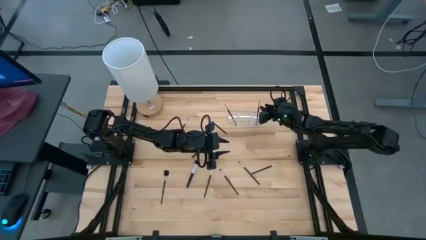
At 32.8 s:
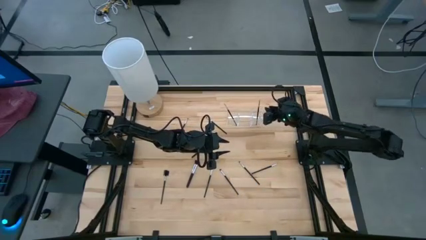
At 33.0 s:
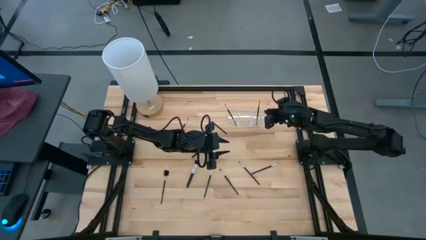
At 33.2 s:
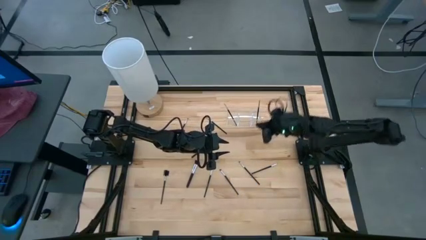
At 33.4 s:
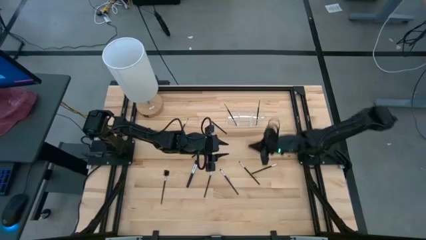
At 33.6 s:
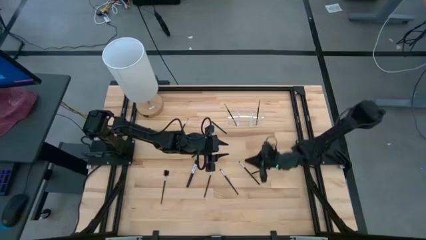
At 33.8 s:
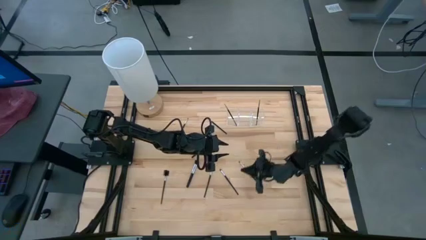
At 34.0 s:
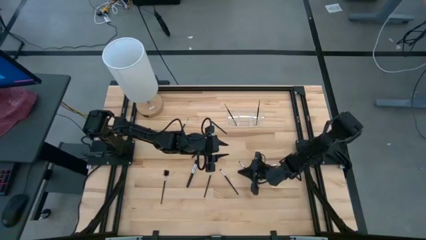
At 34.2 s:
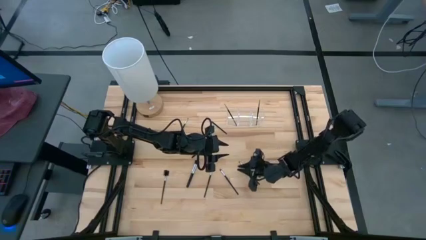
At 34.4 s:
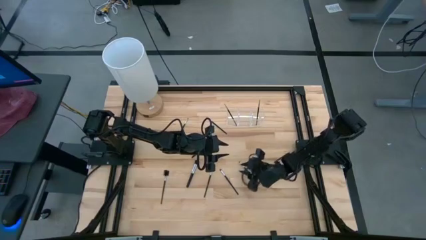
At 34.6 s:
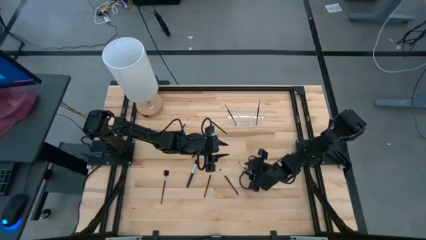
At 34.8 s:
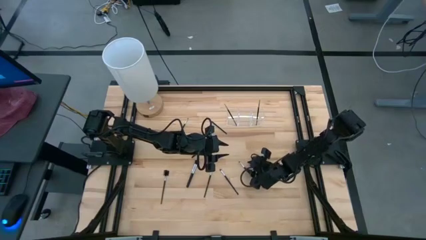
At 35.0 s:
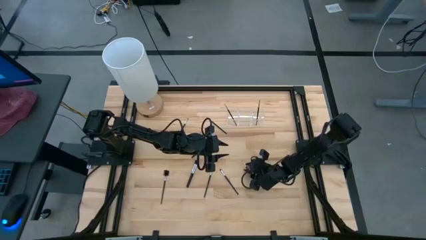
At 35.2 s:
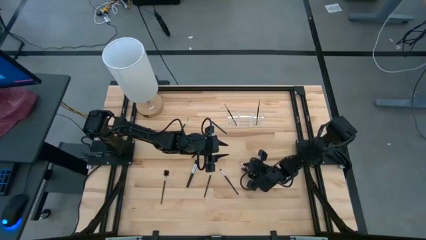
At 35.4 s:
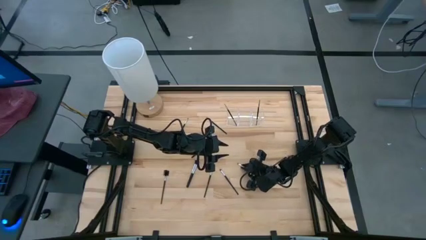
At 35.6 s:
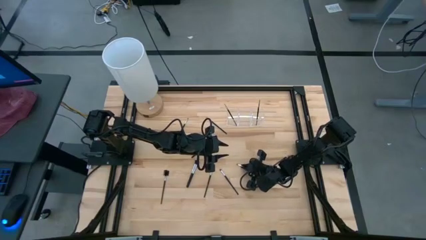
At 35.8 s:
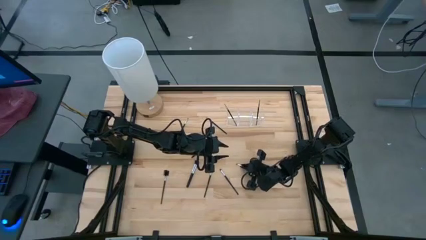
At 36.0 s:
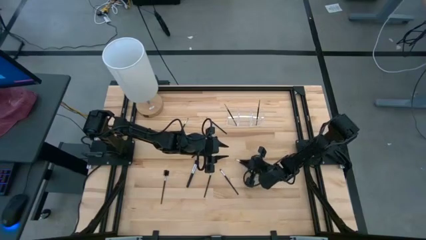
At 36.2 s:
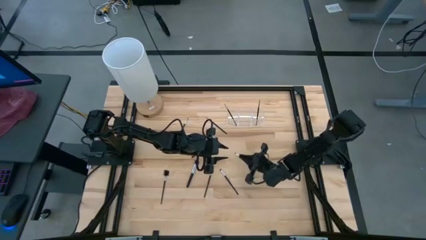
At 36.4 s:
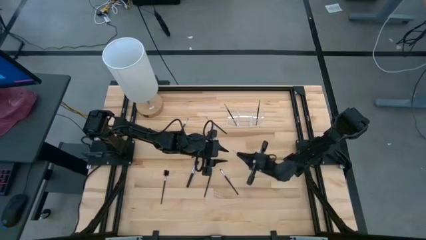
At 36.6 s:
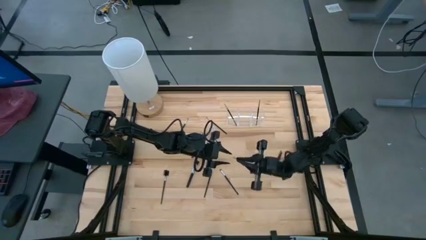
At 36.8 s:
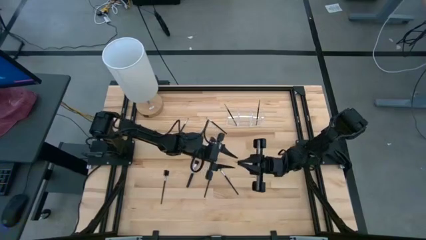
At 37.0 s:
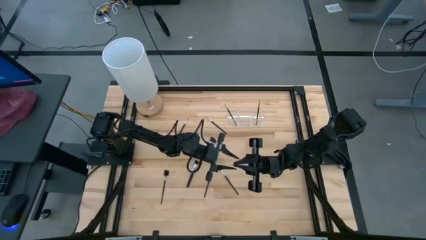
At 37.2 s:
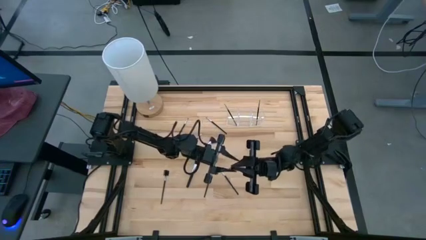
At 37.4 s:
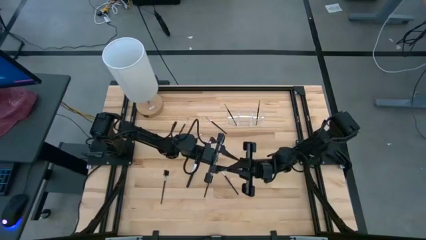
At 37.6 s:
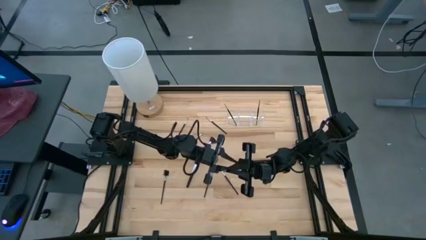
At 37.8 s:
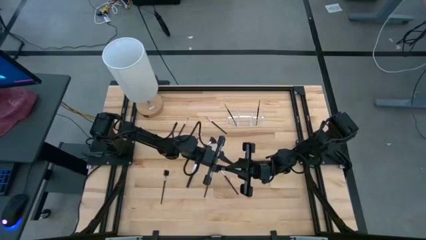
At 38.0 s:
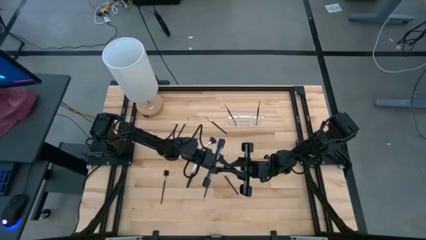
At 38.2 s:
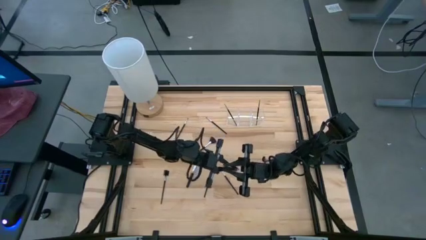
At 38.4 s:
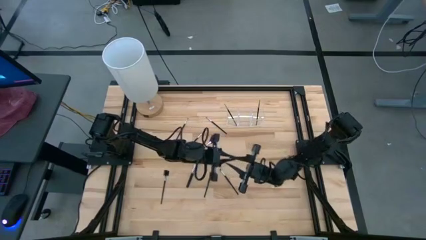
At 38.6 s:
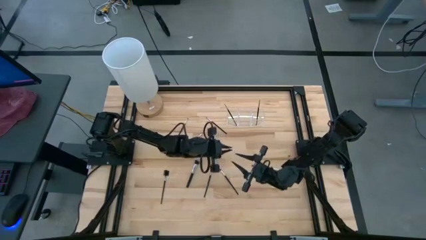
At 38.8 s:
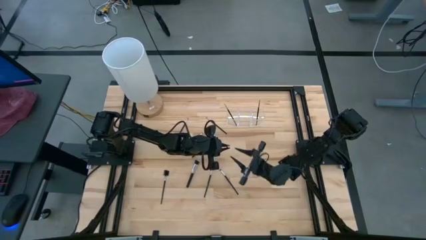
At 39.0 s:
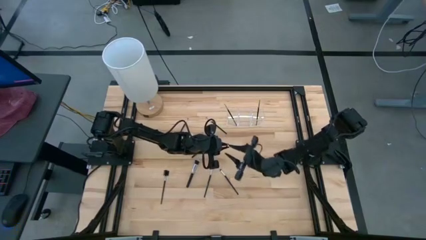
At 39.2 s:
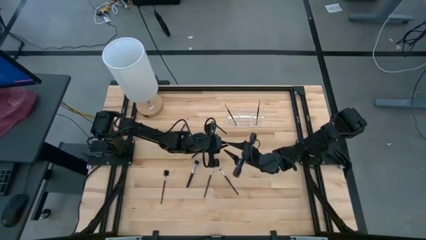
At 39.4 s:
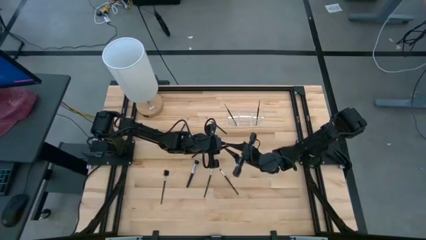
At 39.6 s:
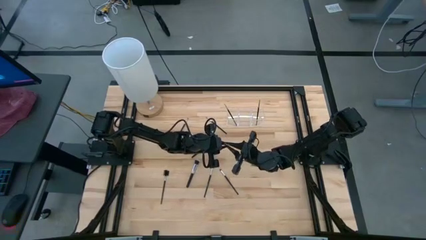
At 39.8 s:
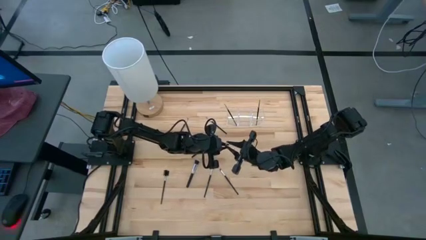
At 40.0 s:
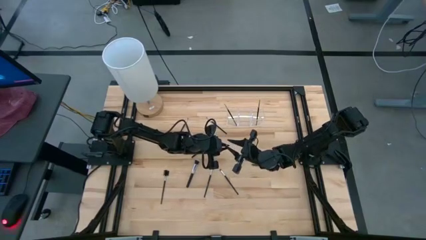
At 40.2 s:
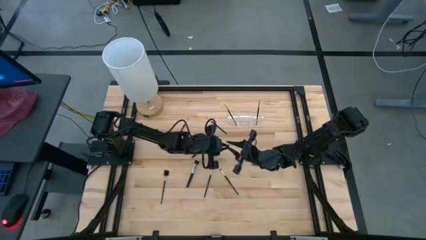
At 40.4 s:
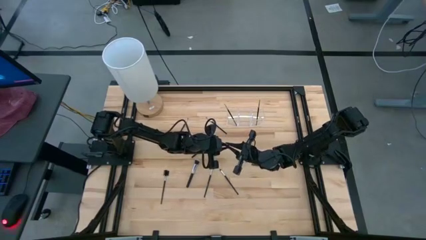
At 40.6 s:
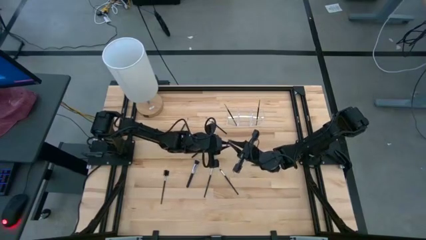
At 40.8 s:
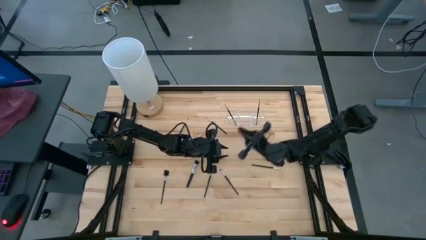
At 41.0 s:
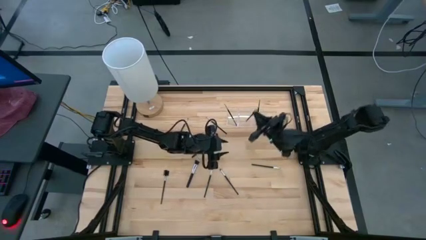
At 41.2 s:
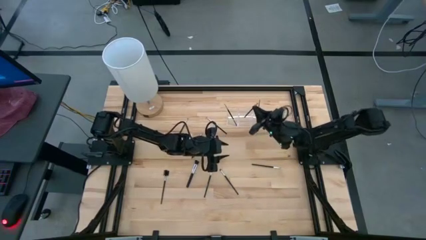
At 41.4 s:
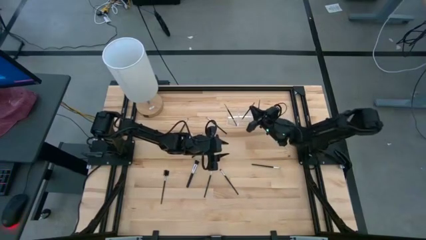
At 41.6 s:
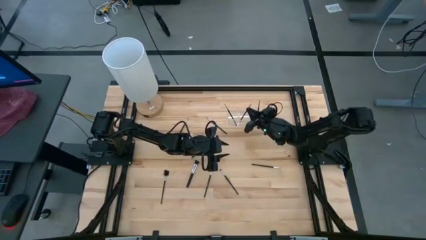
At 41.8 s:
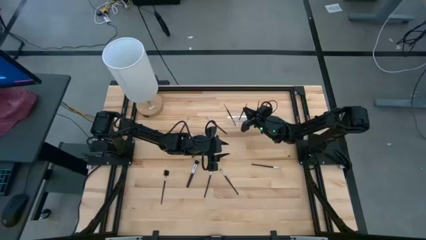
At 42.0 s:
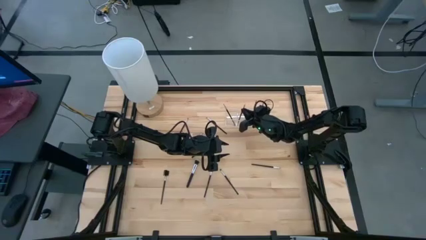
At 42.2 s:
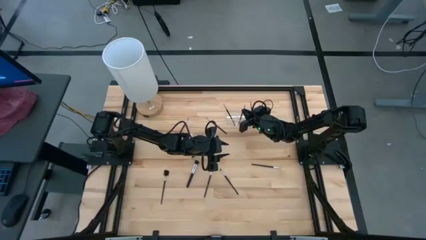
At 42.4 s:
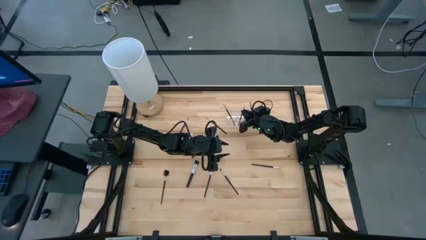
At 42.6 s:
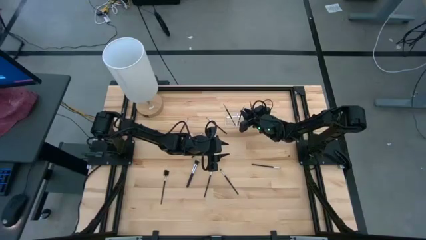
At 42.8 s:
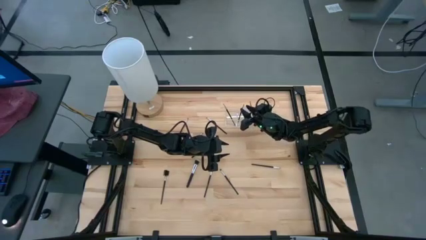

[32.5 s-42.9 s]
Task: Put items in baskets/containers
Put the black eyeshadow brush into the transparent organizer
